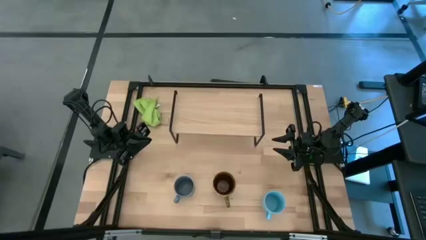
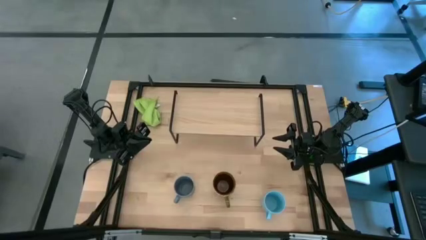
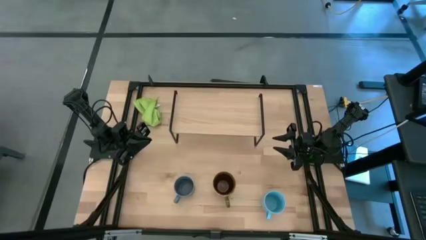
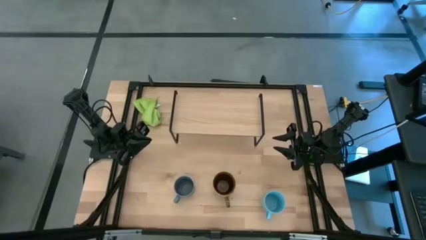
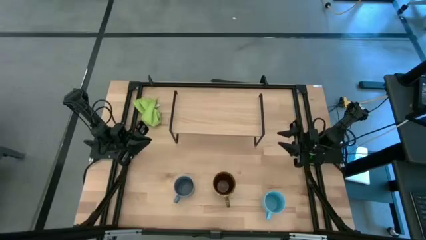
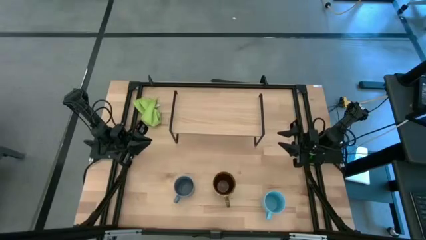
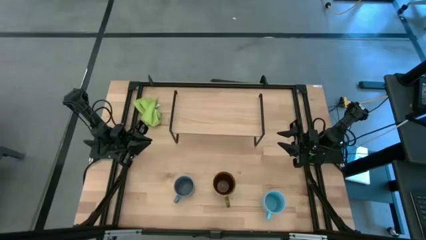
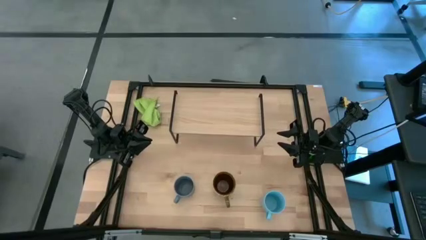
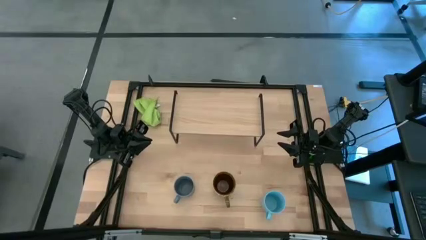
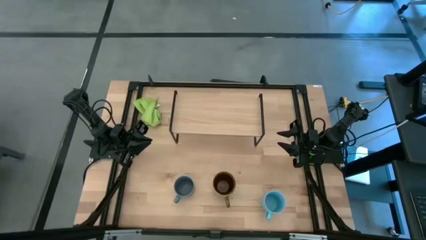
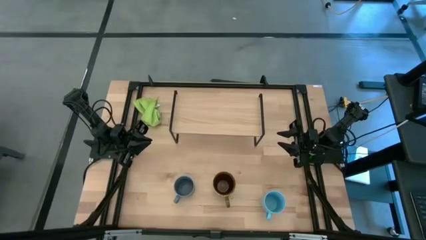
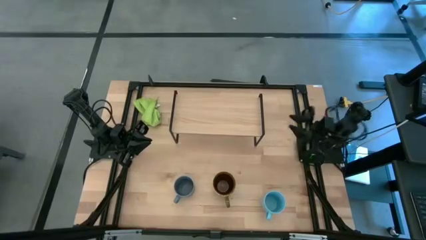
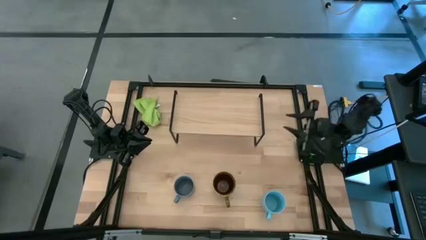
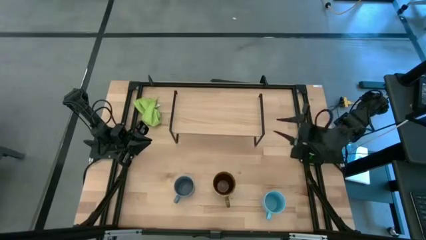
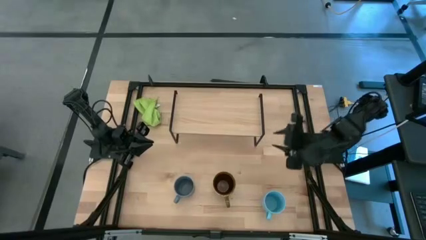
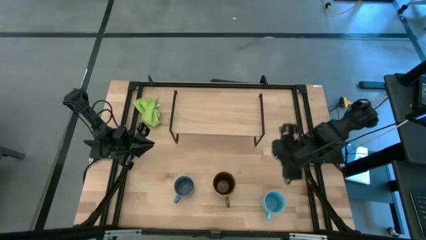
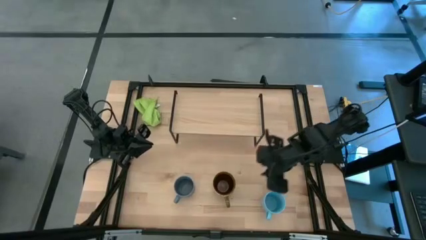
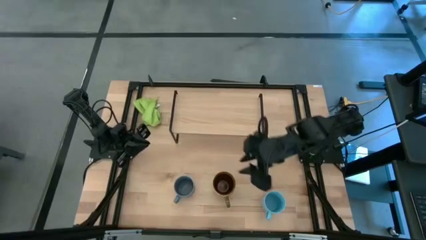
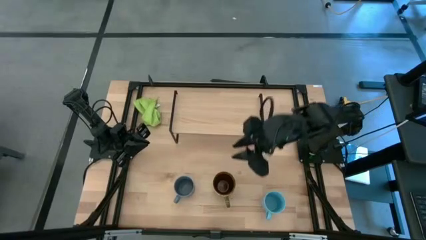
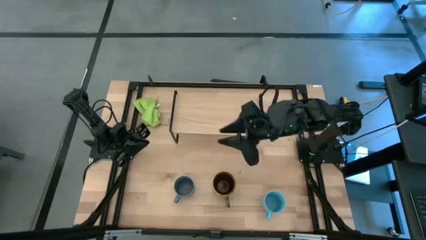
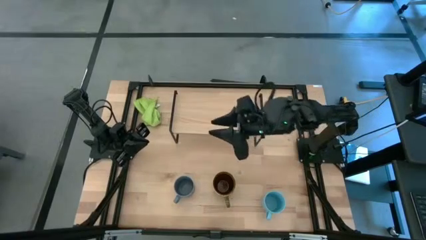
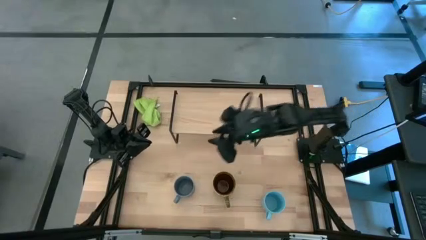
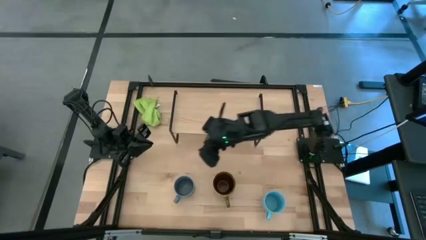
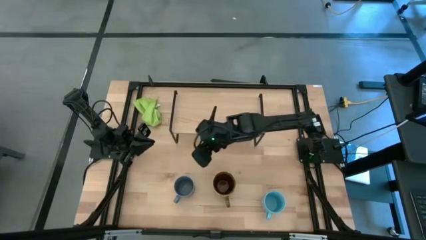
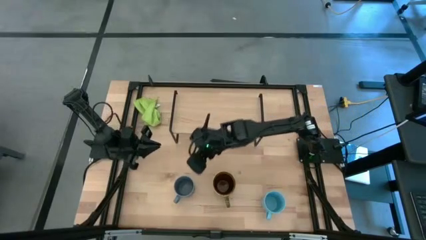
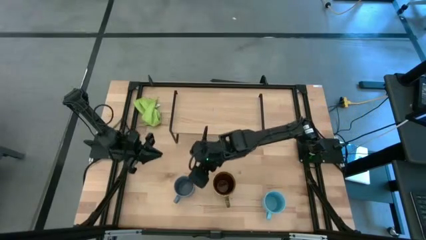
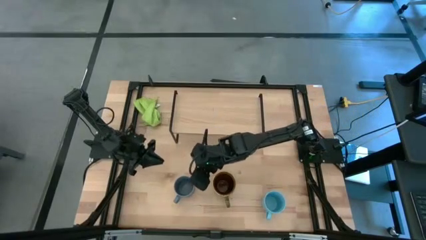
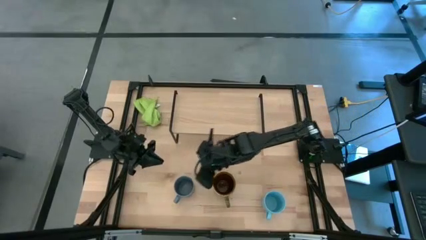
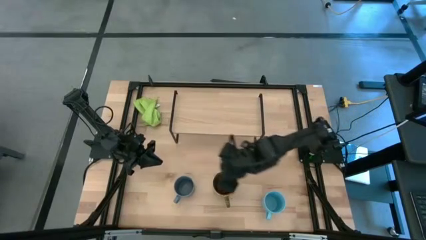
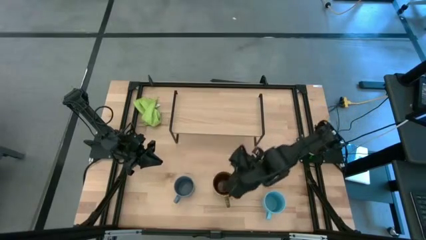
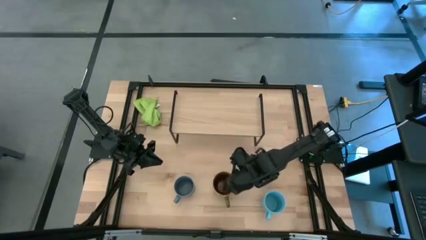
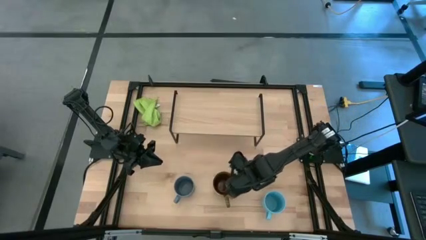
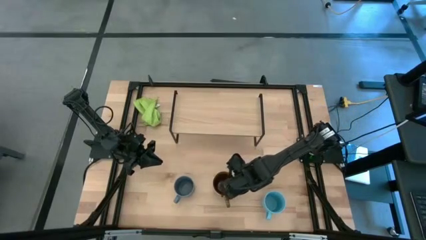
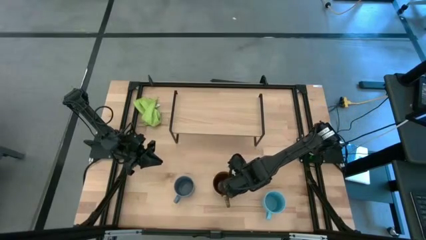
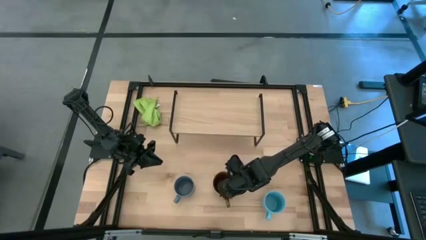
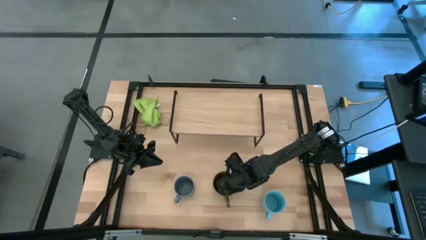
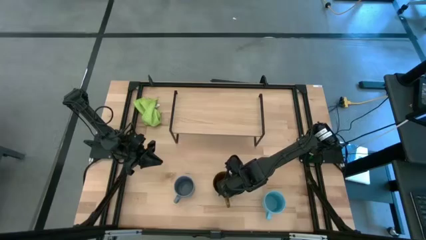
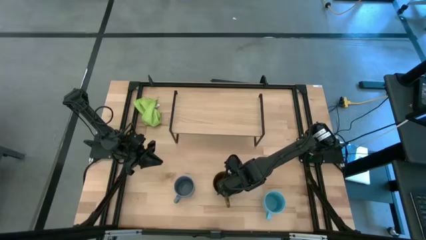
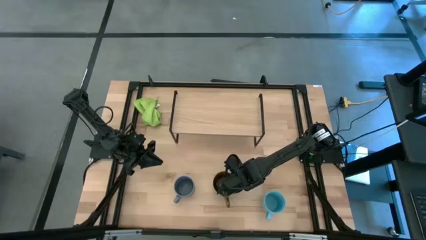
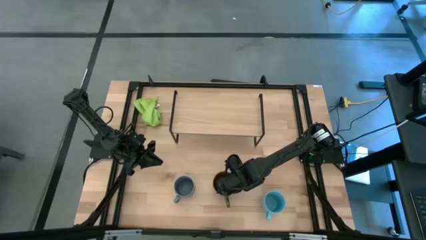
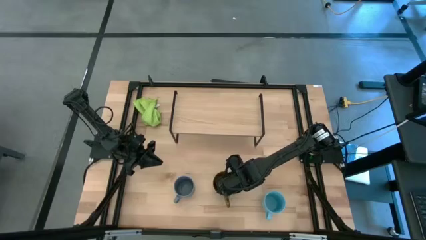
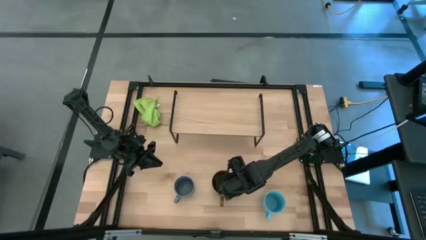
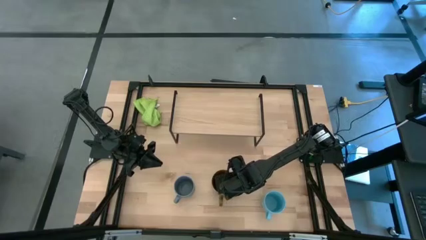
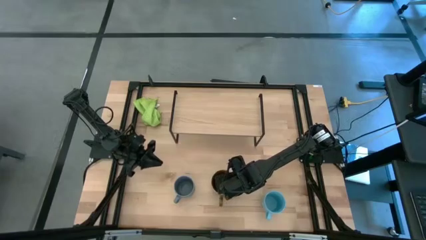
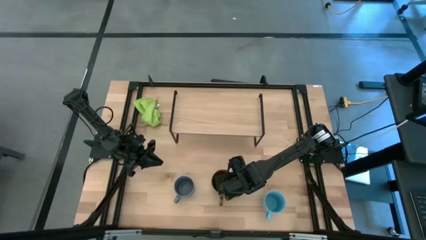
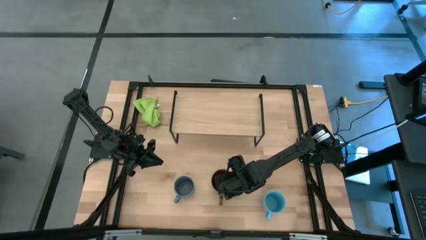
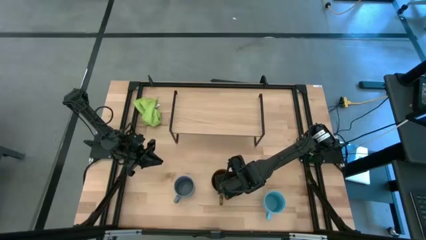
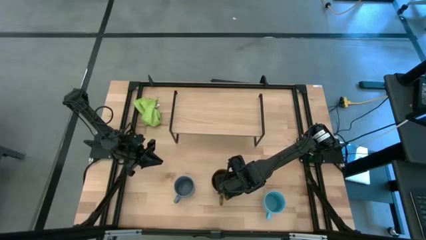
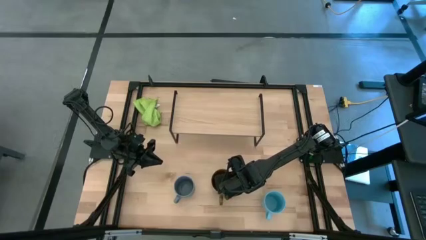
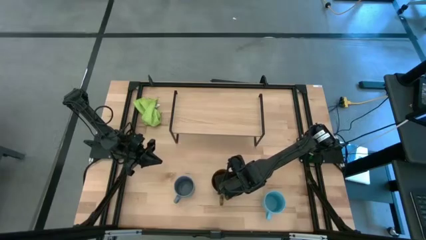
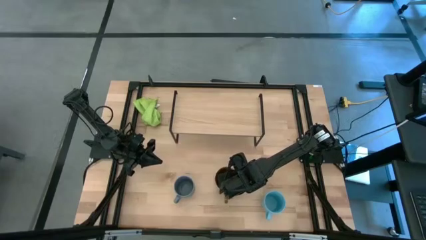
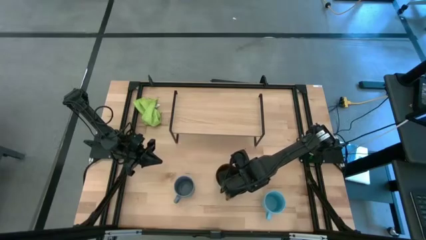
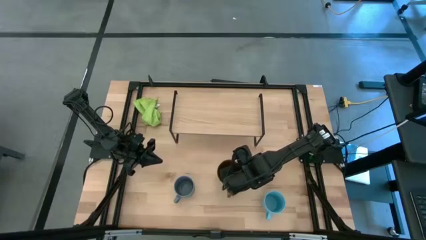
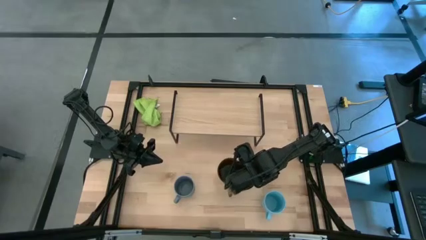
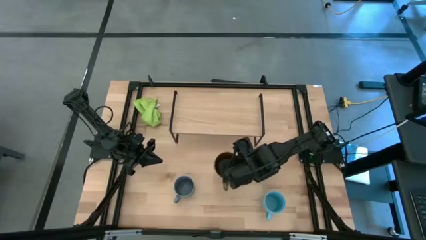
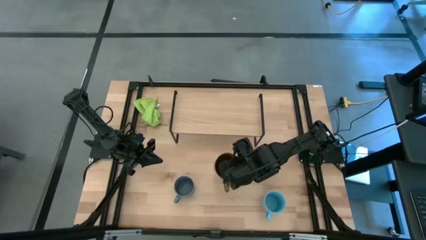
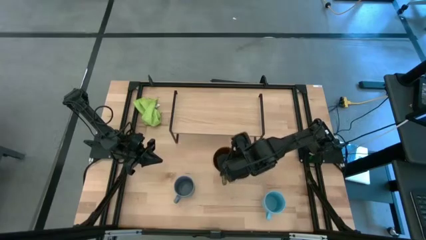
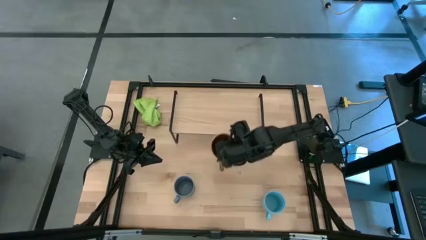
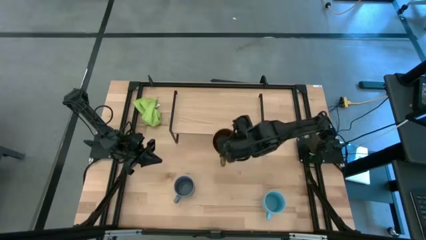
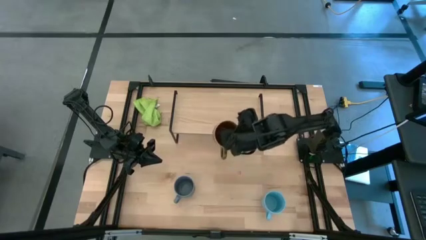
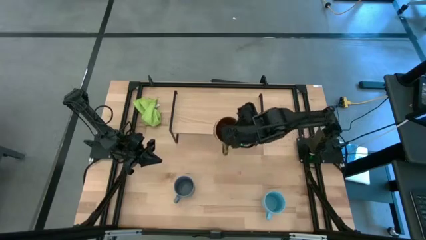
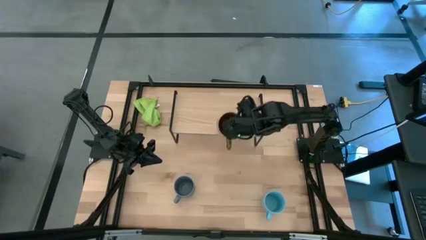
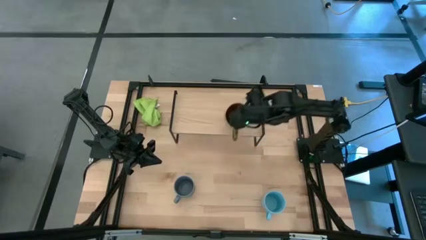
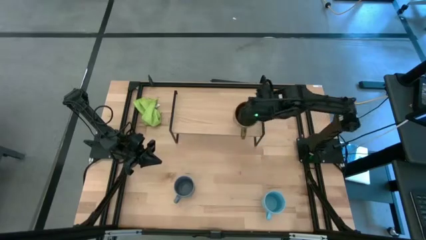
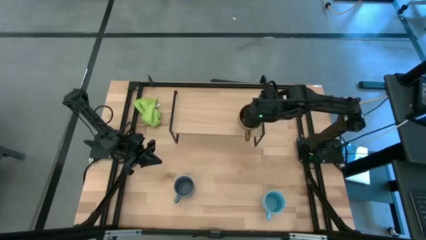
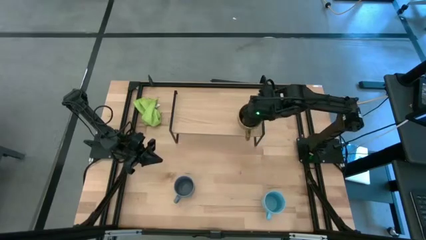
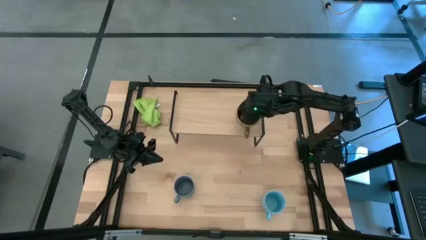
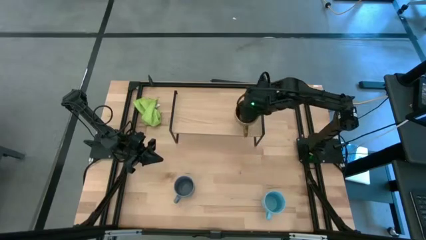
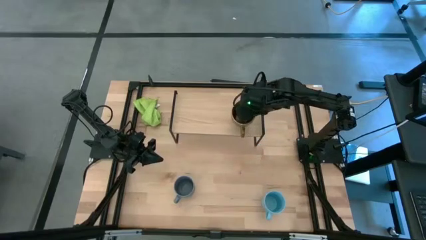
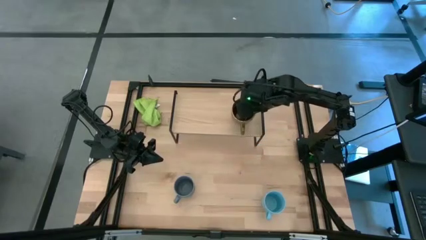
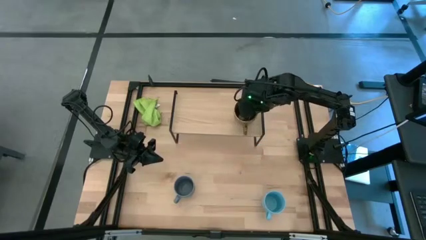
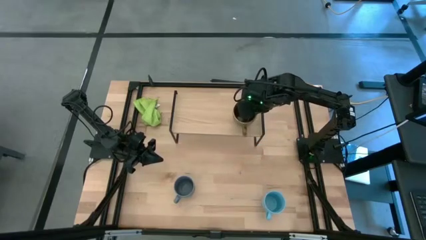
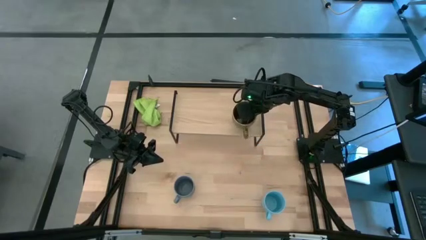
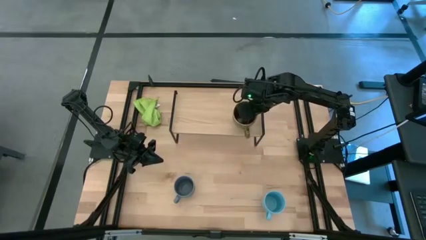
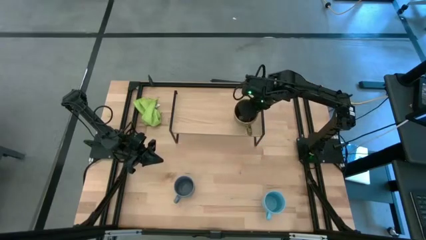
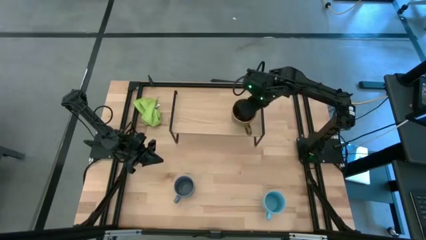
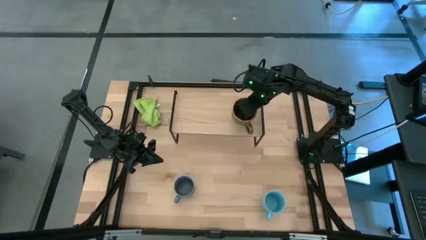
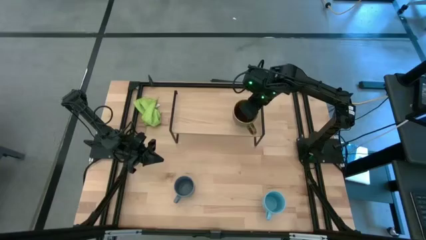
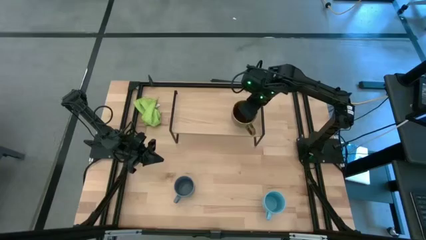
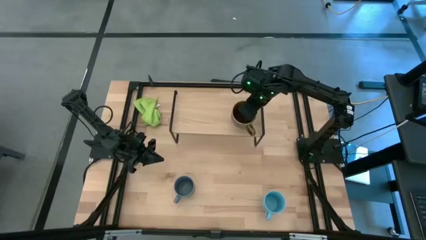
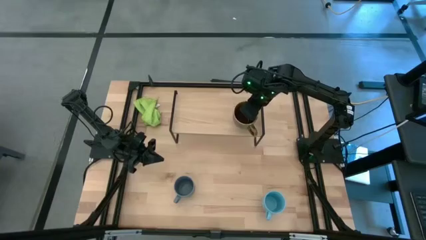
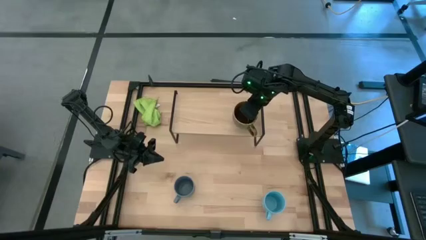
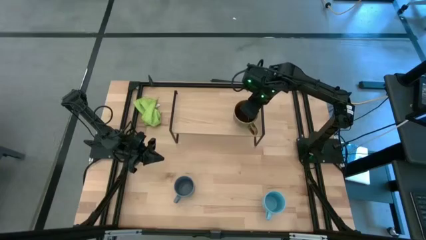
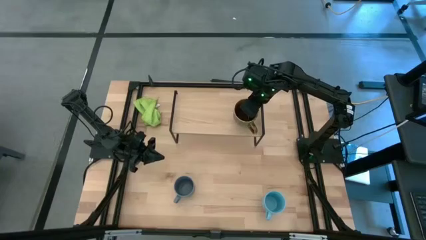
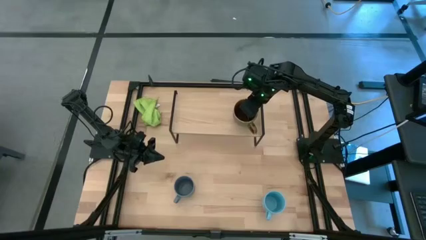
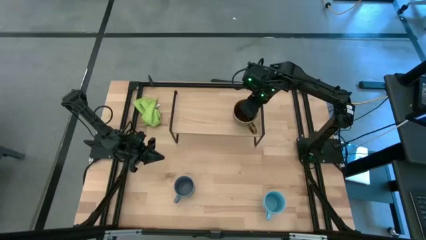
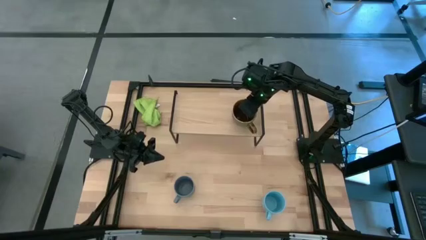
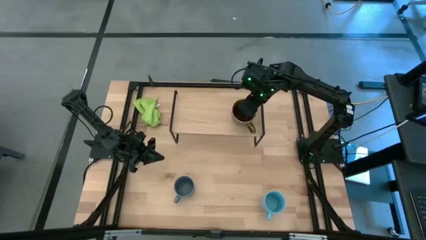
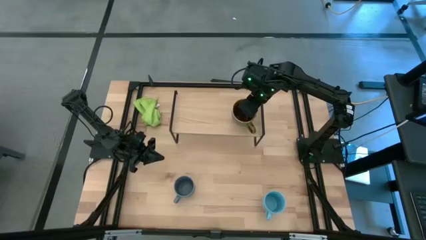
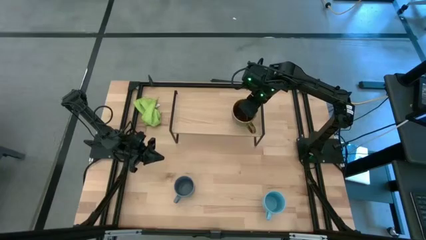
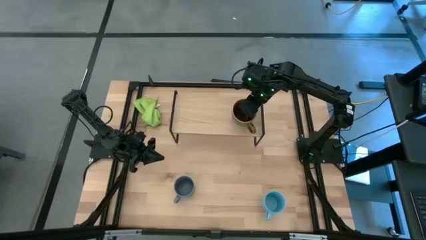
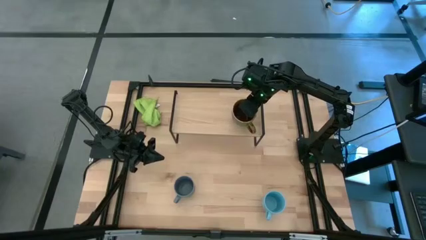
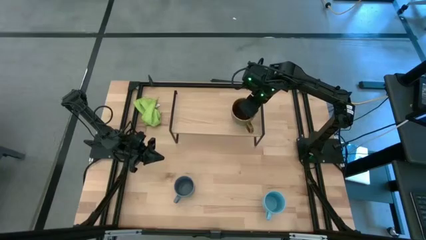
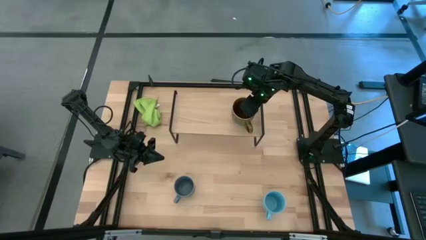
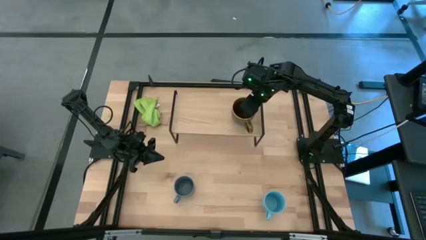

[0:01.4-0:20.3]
Task: Stack small to large cups/mugs on shelf
Put the gold mug on the shelf
